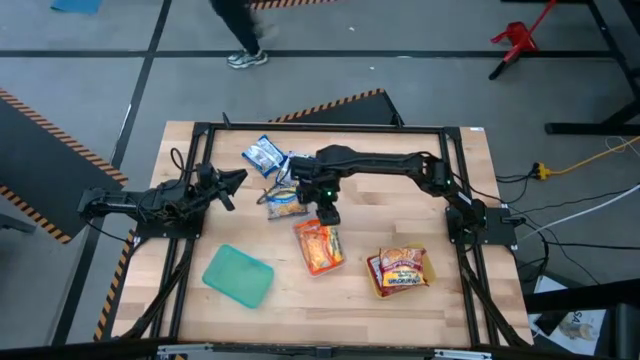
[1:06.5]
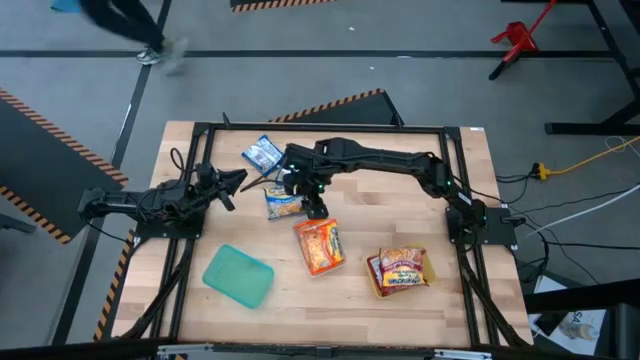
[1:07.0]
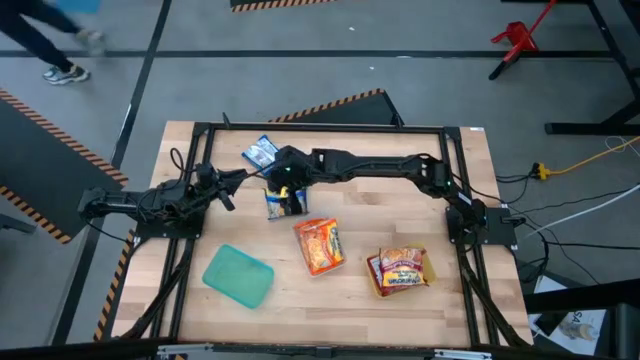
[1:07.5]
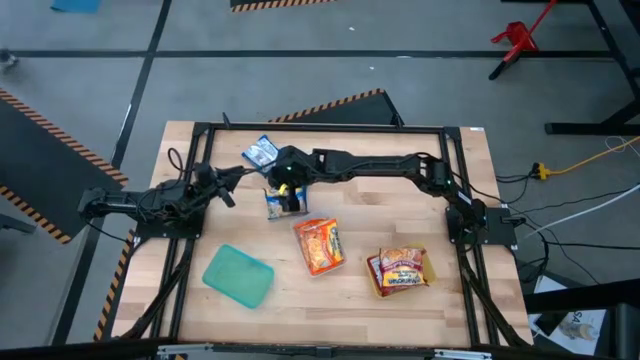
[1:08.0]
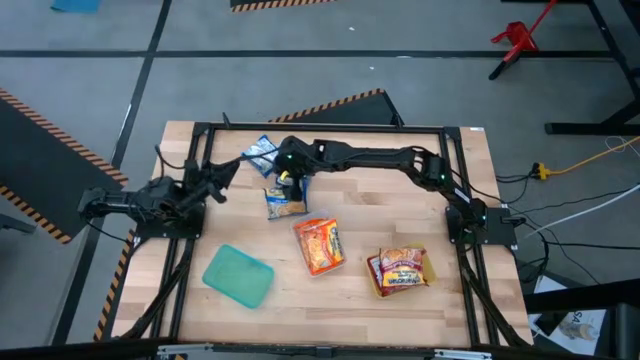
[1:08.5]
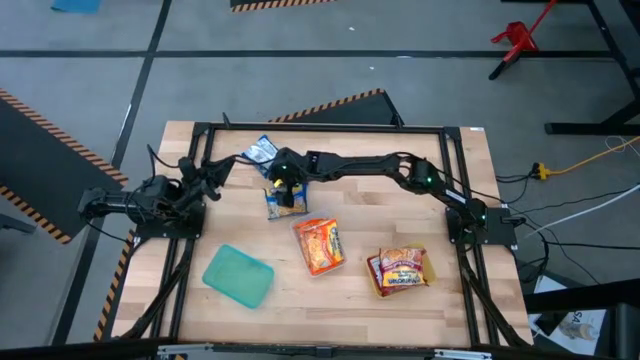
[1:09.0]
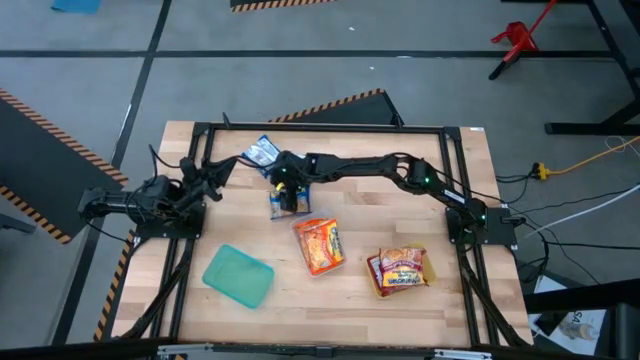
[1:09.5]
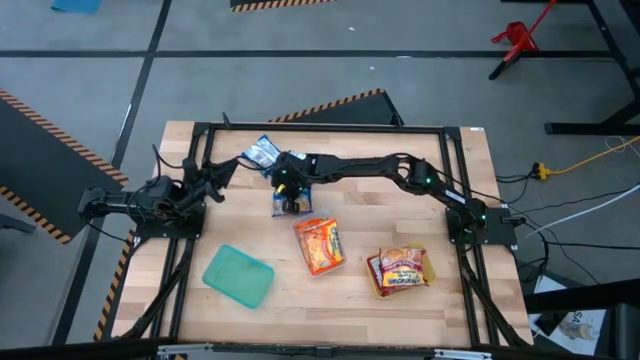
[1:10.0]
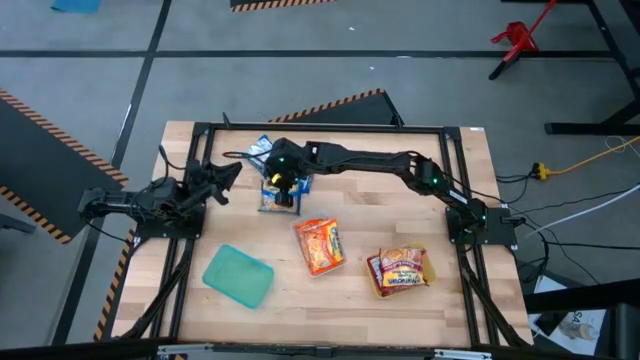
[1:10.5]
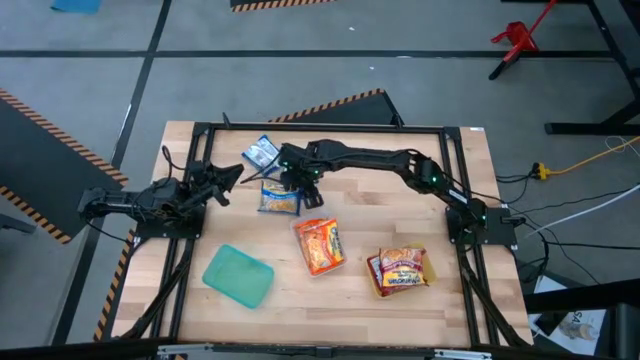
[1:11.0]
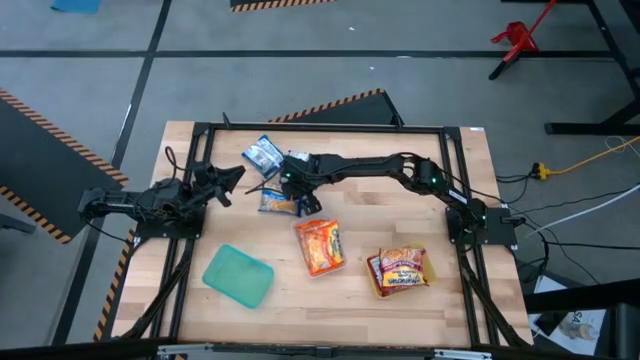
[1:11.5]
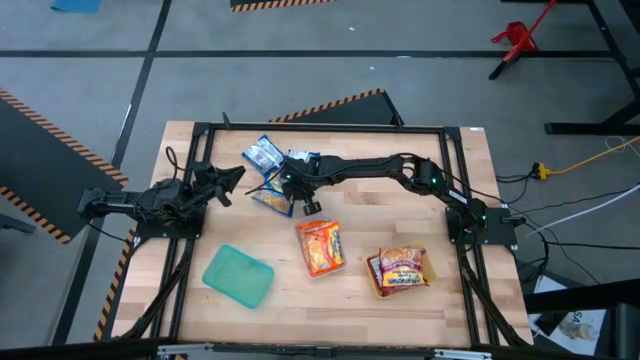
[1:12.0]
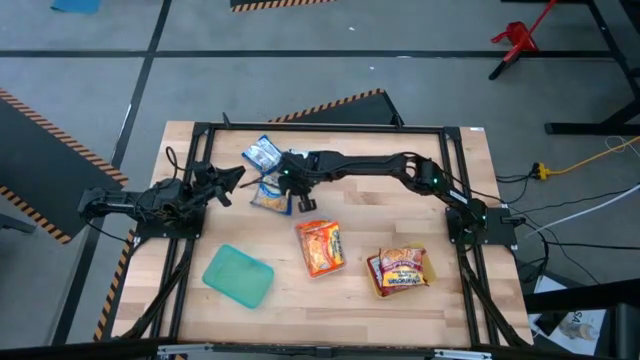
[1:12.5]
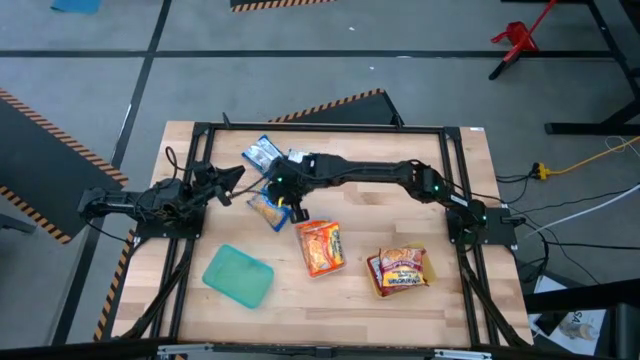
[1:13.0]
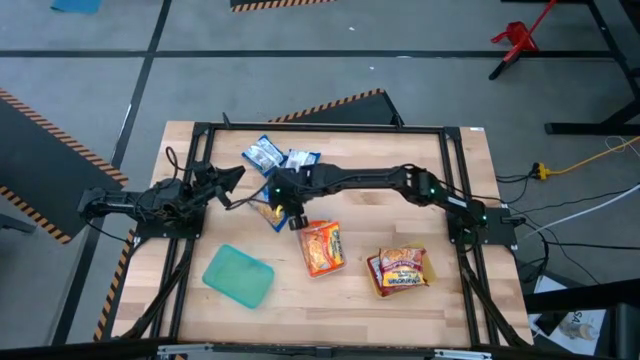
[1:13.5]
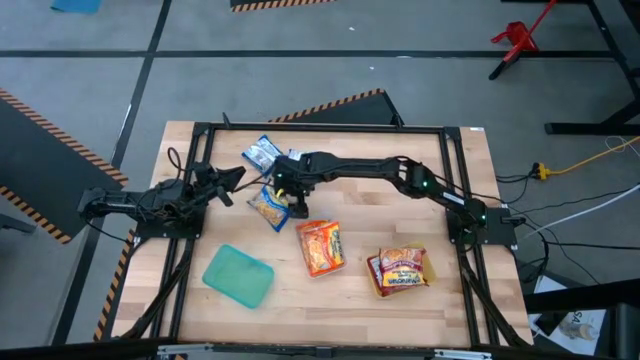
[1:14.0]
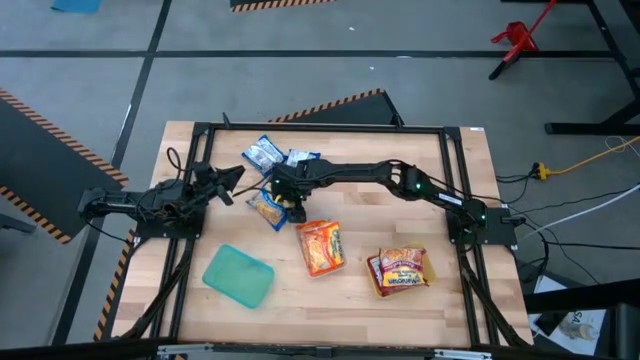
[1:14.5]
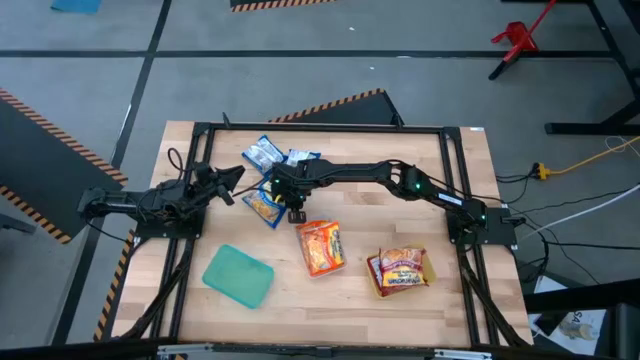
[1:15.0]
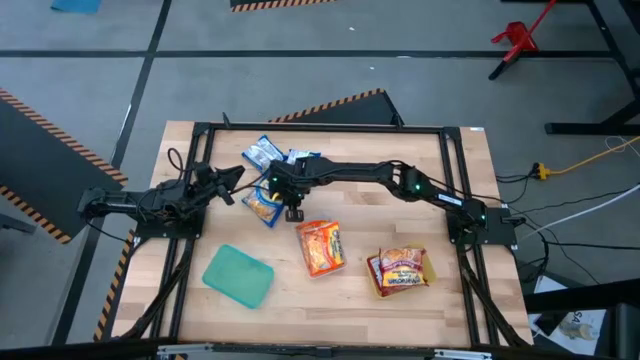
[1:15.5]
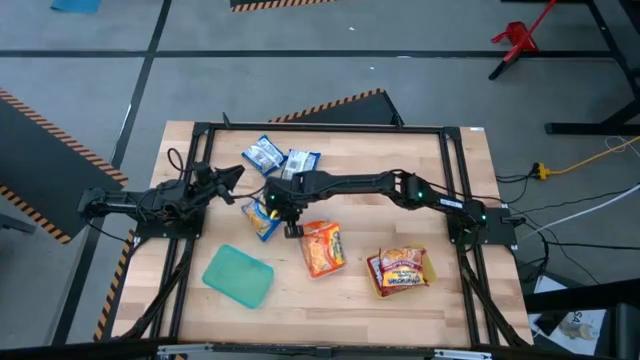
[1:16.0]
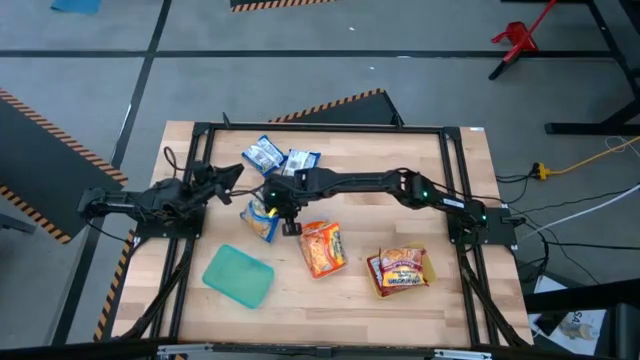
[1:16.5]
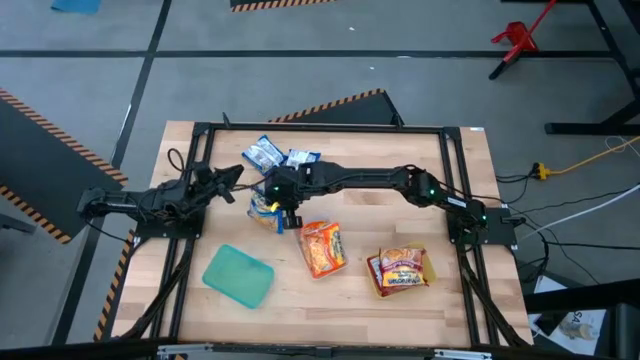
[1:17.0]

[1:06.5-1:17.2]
Task: Sort Maruchan noodles
Put the bottom blue noodle pack into the green bin

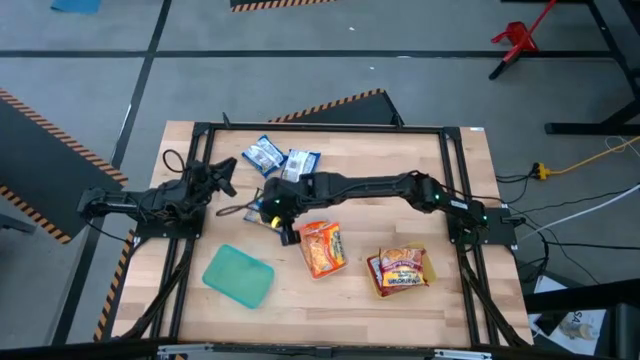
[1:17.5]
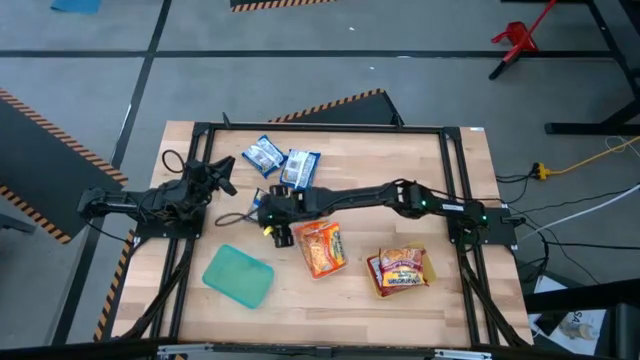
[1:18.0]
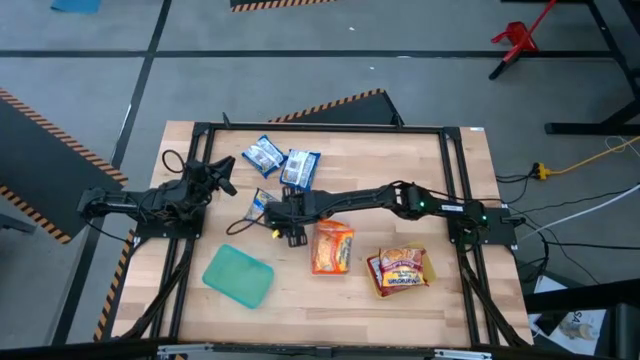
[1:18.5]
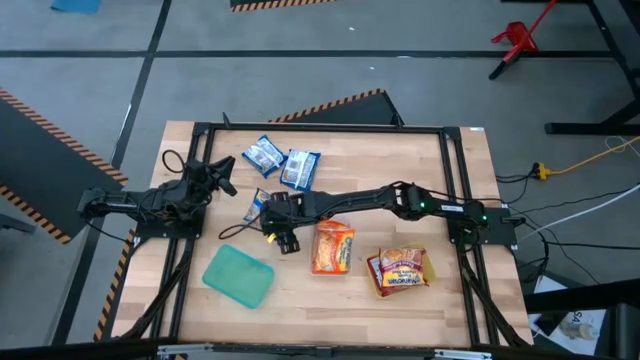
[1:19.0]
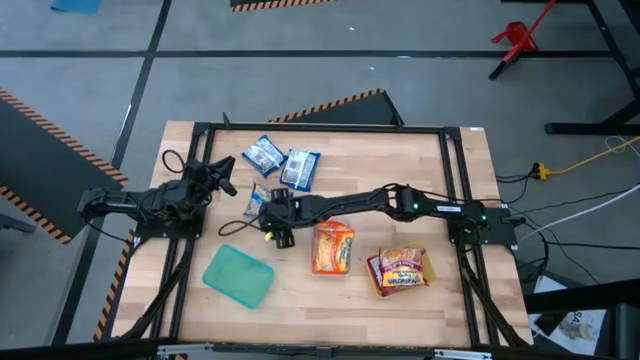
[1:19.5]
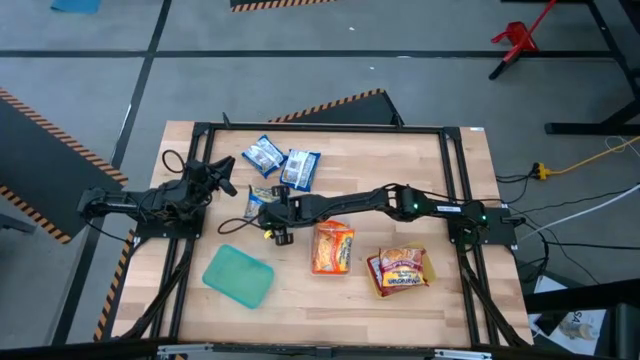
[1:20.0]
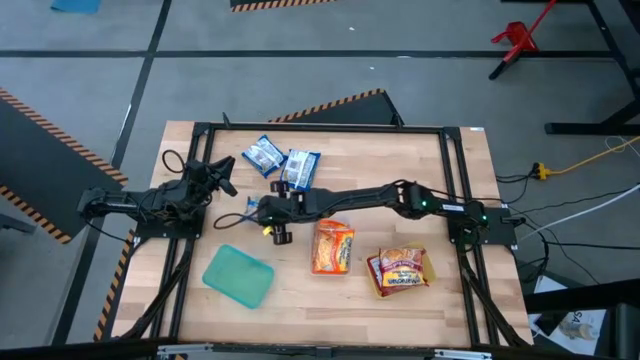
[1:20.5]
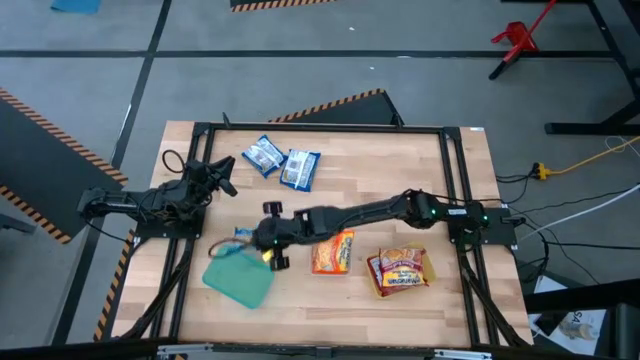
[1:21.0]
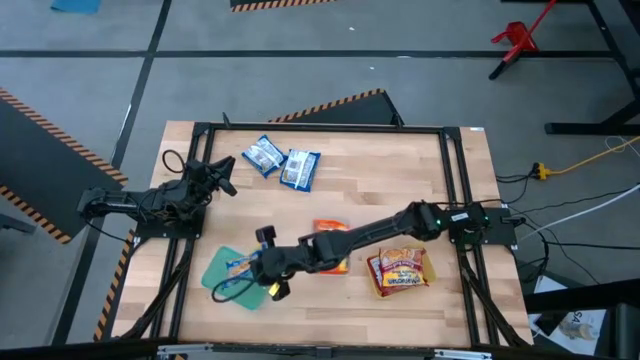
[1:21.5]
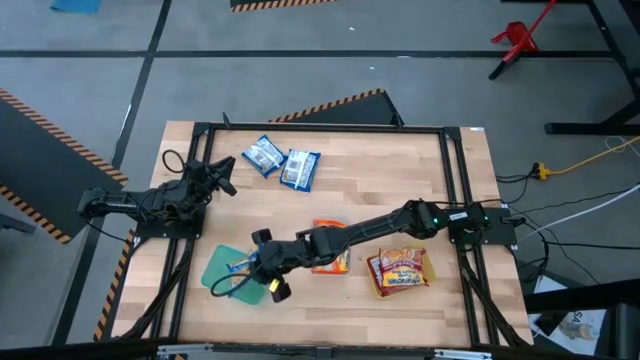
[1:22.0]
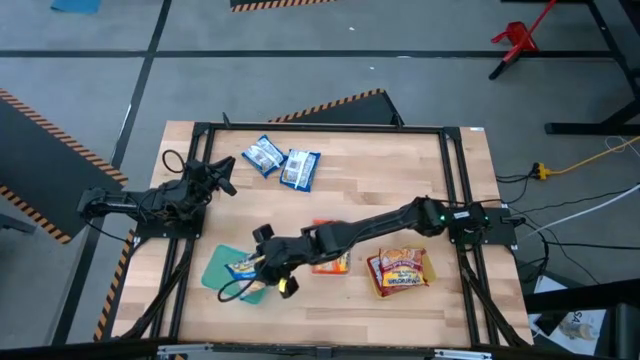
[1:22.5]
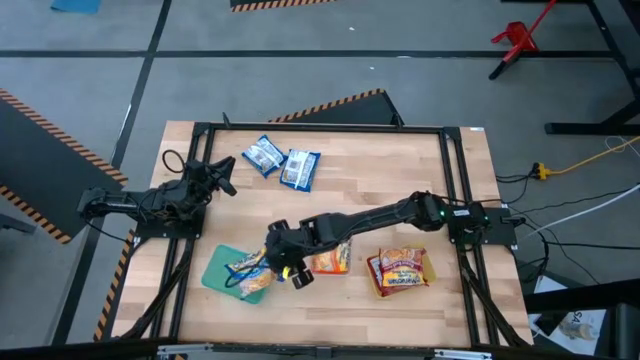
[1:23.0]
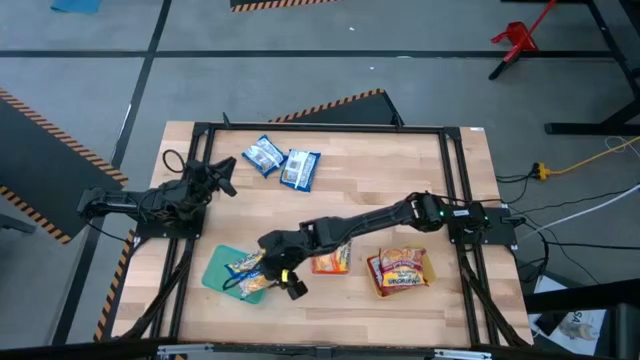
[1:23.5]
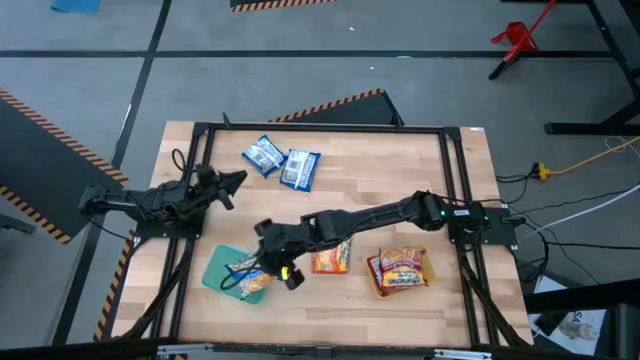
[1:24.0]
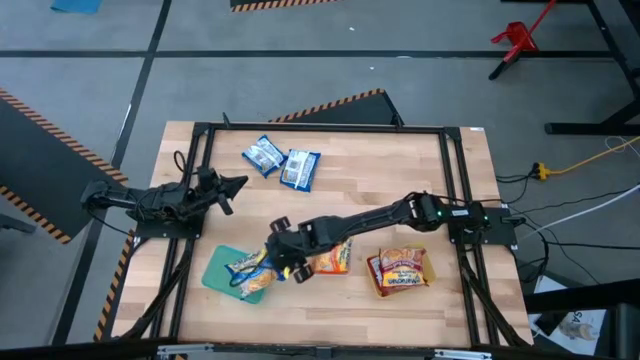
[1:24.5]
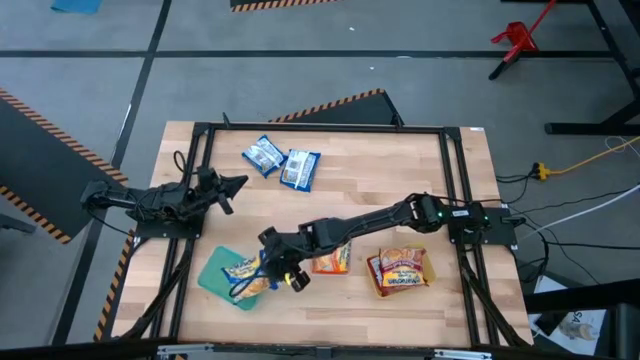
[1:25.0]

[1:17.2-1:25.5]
Put the bottom right blue noodle pack into the green bin

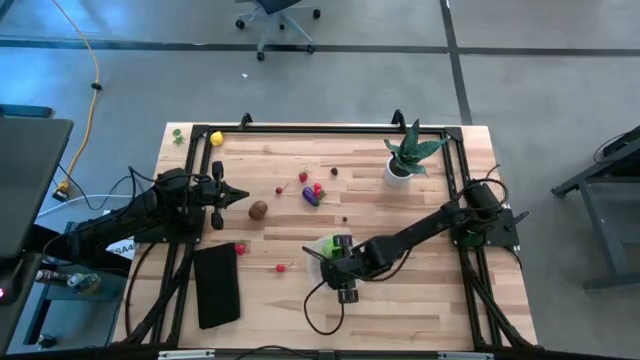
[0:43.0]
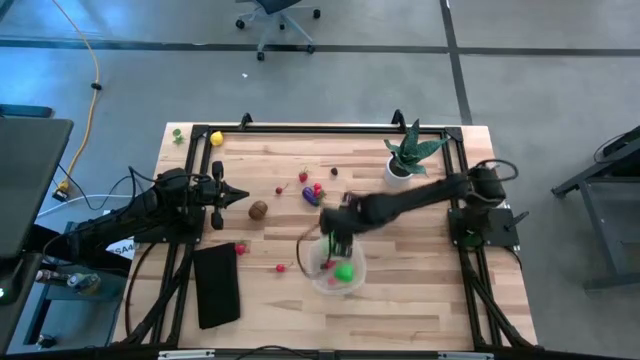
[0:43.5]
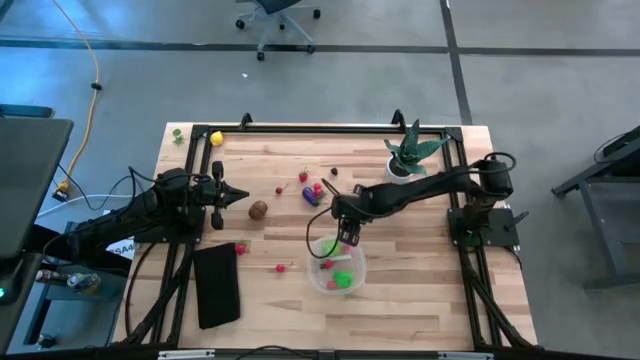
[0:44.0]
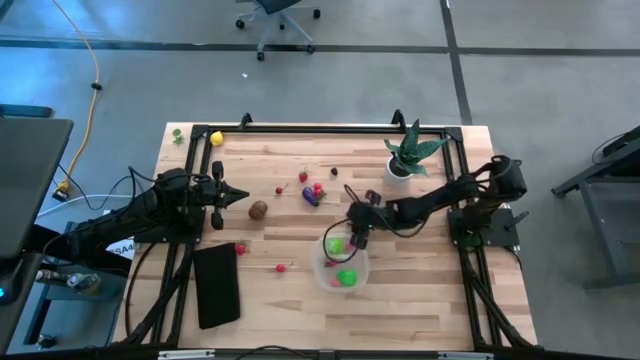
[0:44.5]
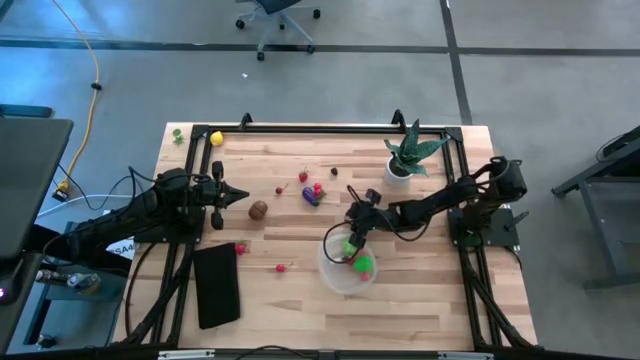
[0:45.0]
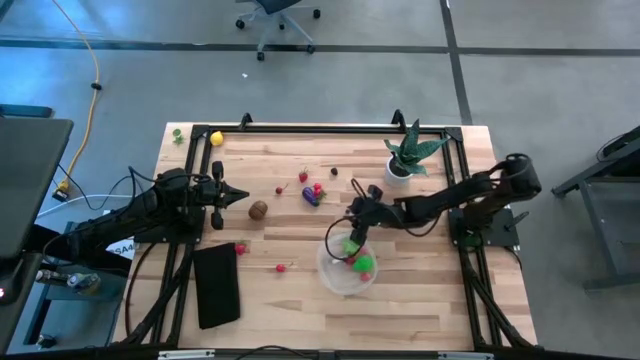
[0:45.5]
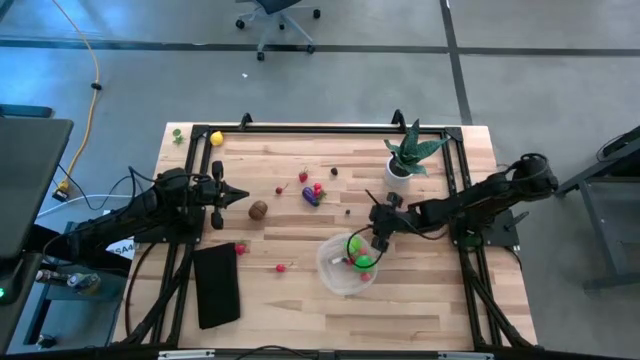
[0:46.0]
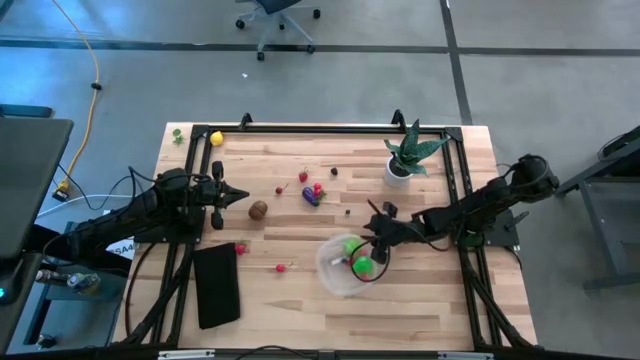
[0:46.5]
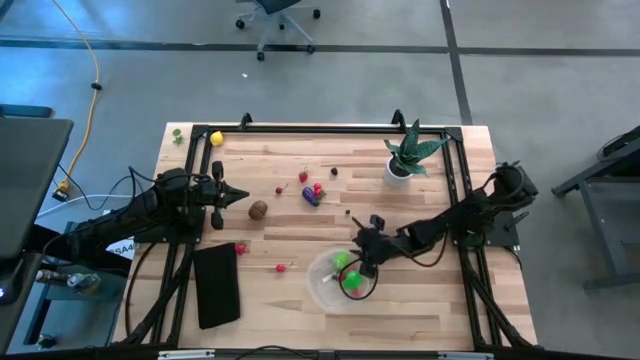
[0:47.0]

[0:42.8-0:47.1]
Task: Pick and placing Produce into tupperware
Adjust the transparent container on the table
